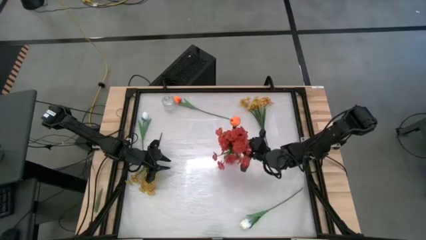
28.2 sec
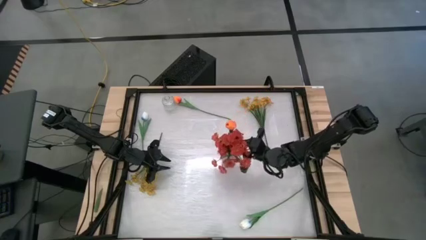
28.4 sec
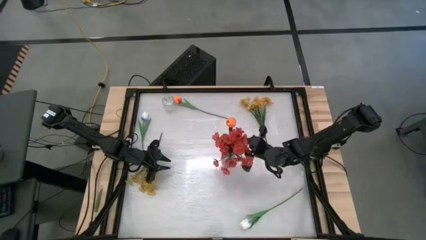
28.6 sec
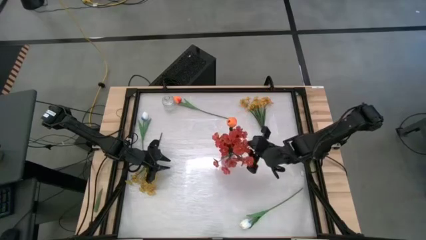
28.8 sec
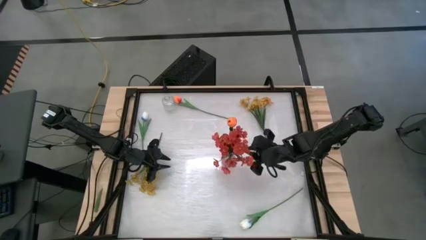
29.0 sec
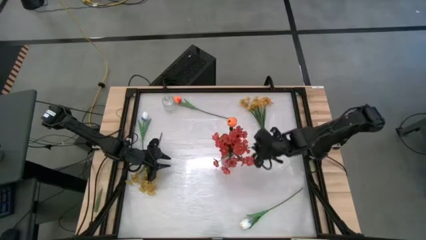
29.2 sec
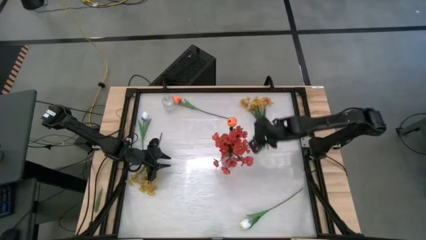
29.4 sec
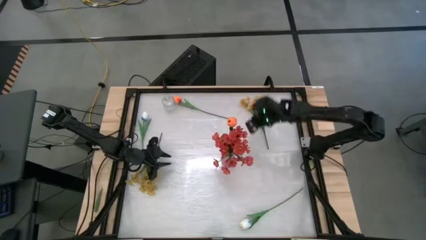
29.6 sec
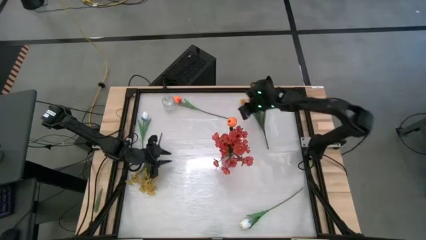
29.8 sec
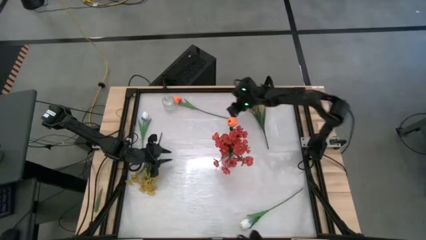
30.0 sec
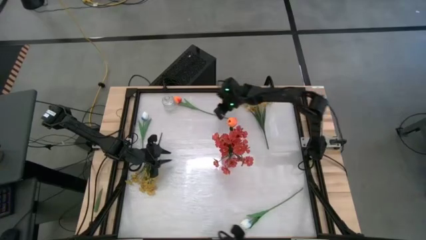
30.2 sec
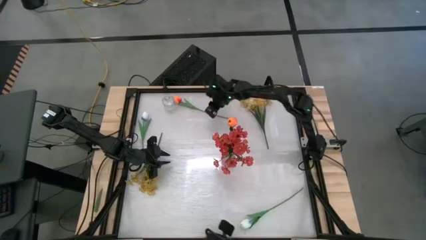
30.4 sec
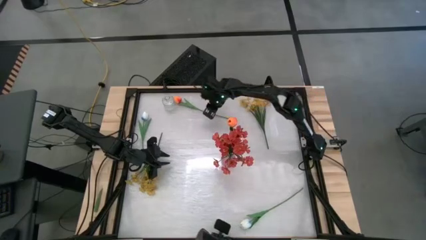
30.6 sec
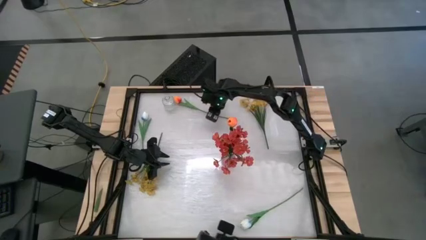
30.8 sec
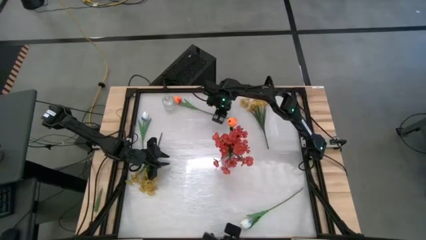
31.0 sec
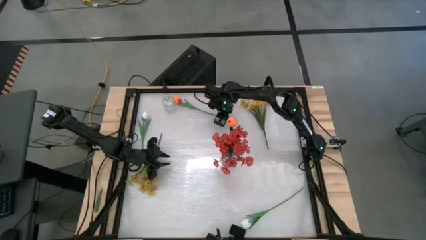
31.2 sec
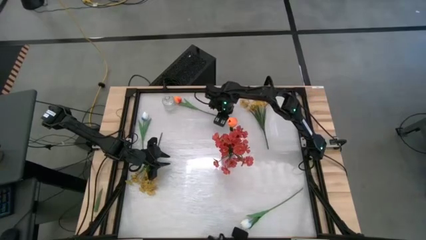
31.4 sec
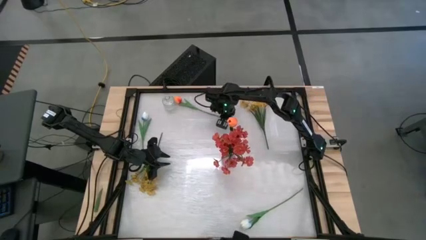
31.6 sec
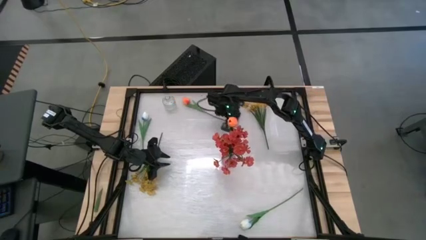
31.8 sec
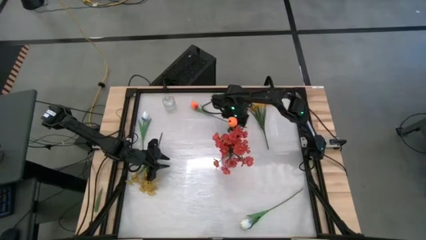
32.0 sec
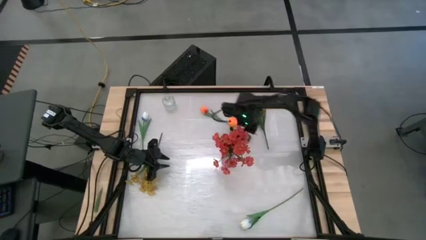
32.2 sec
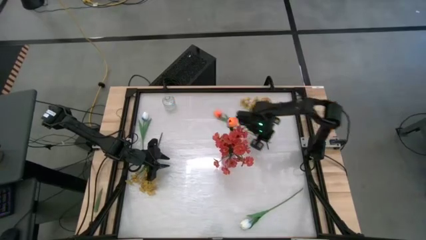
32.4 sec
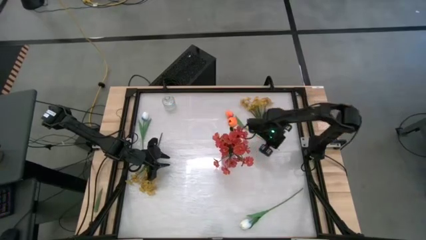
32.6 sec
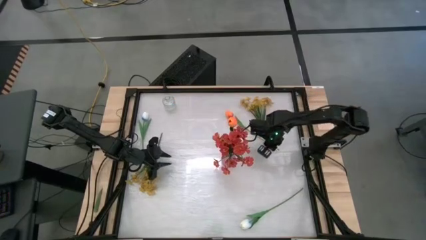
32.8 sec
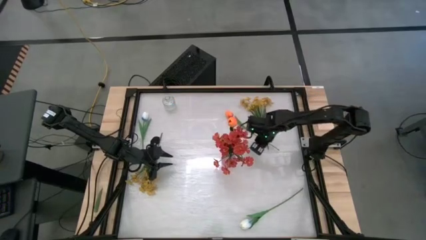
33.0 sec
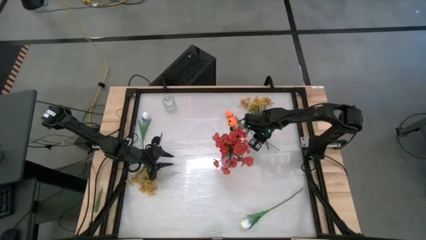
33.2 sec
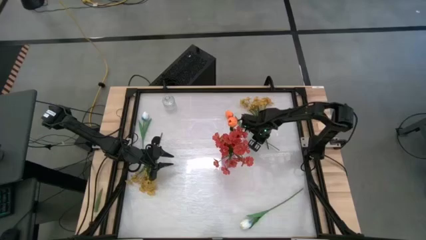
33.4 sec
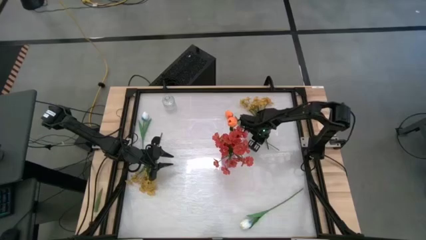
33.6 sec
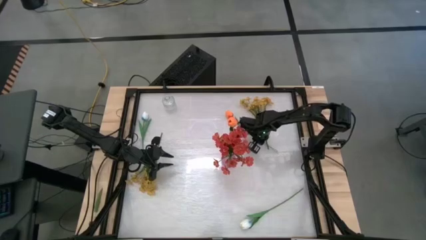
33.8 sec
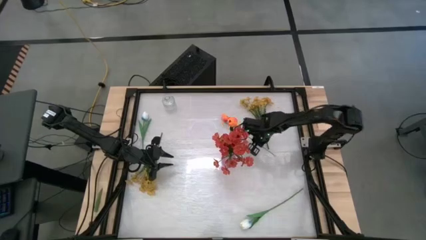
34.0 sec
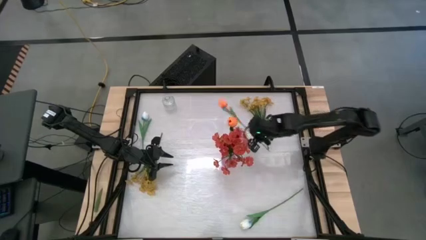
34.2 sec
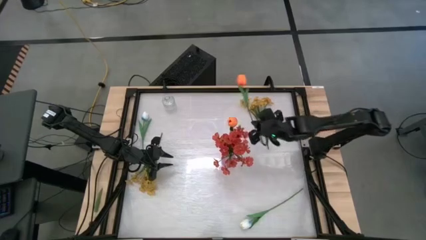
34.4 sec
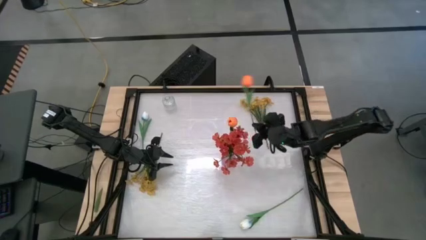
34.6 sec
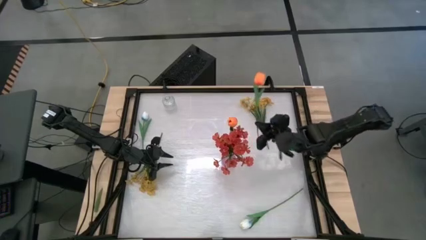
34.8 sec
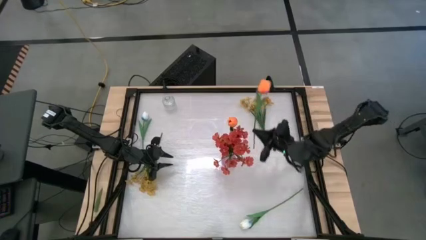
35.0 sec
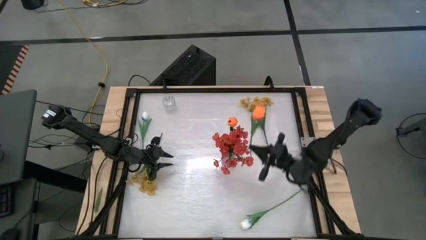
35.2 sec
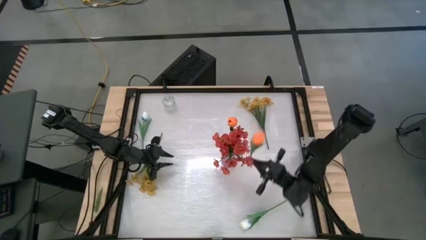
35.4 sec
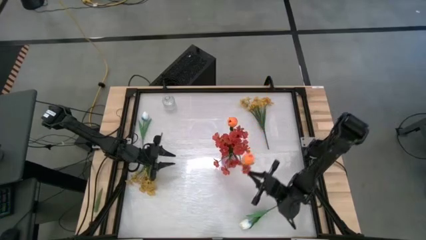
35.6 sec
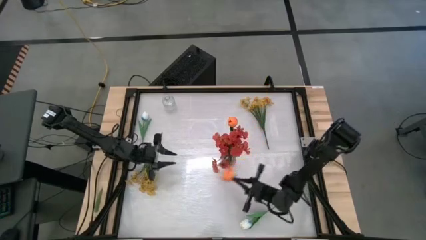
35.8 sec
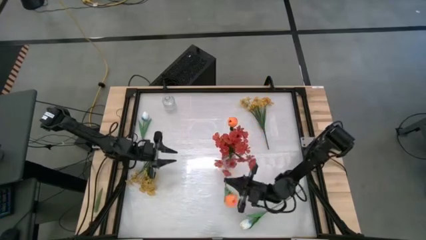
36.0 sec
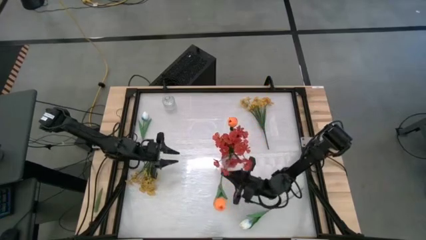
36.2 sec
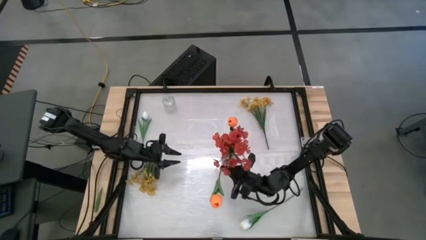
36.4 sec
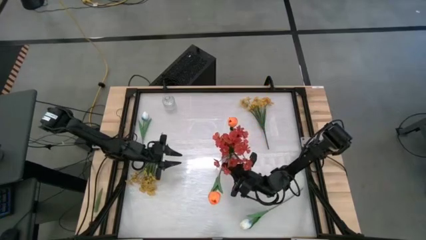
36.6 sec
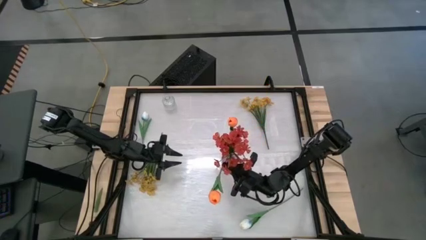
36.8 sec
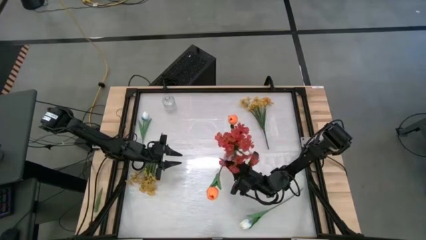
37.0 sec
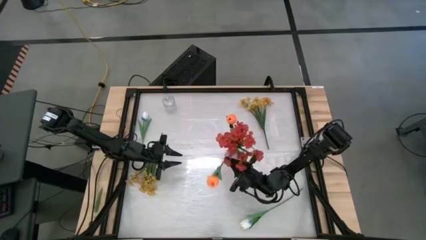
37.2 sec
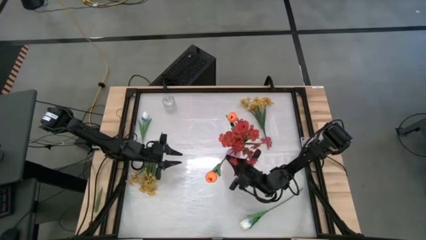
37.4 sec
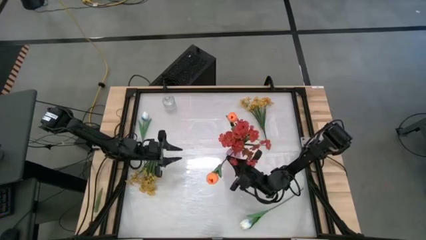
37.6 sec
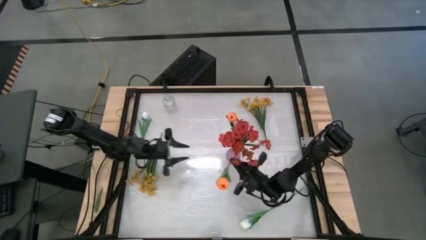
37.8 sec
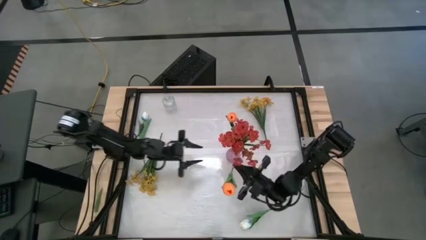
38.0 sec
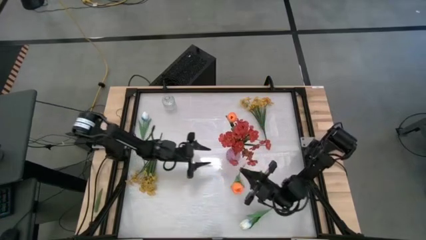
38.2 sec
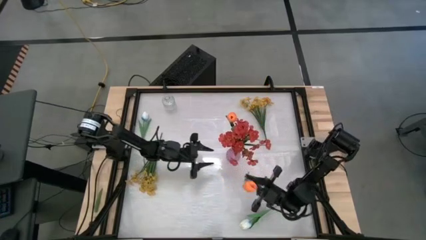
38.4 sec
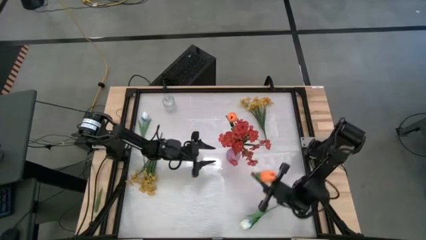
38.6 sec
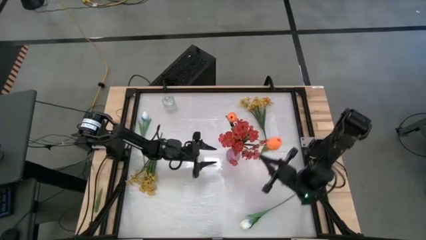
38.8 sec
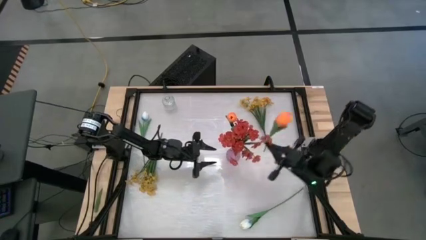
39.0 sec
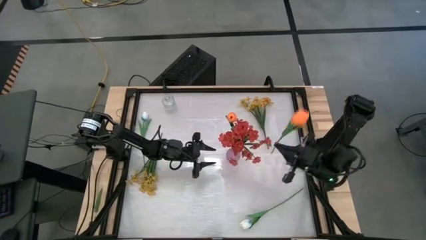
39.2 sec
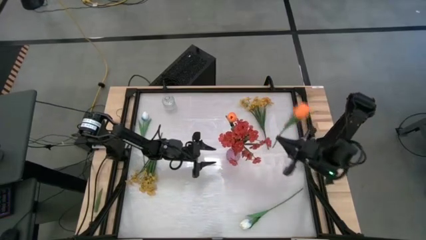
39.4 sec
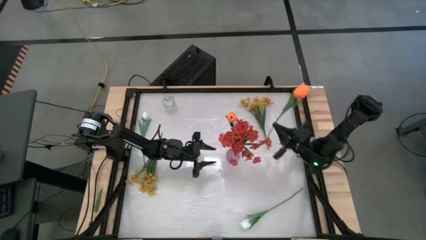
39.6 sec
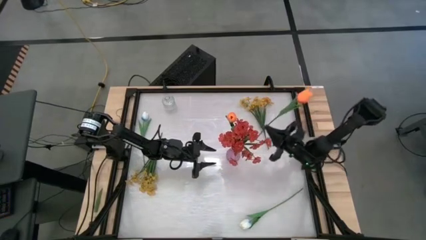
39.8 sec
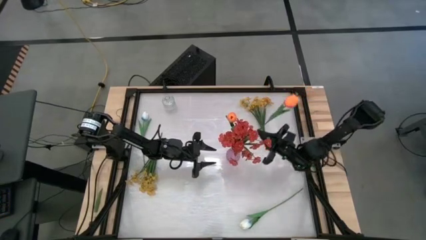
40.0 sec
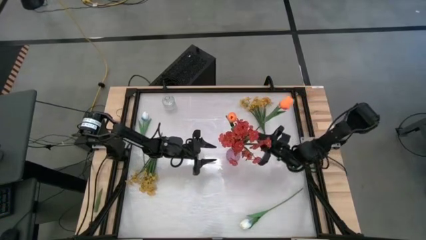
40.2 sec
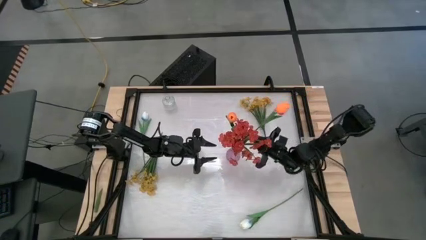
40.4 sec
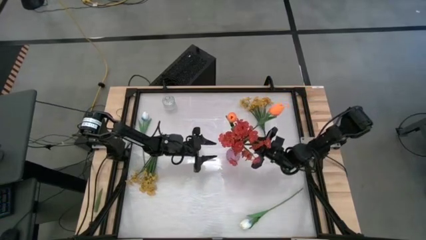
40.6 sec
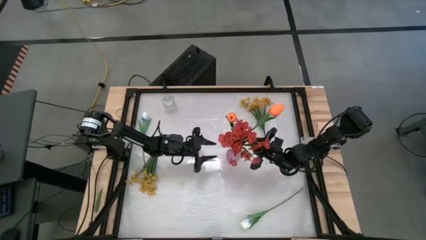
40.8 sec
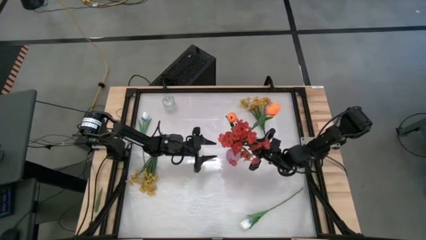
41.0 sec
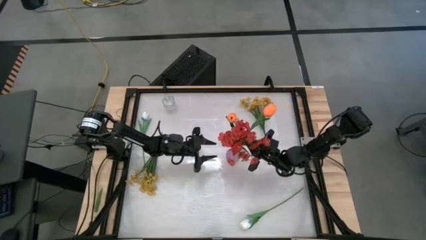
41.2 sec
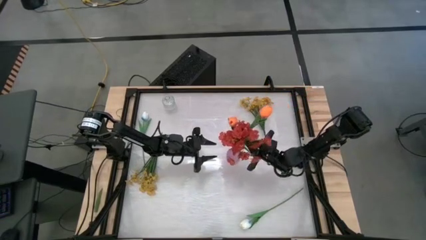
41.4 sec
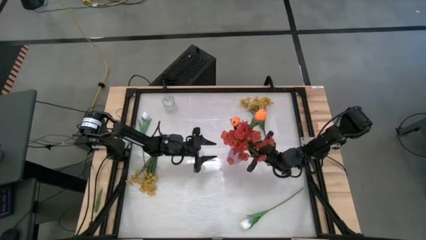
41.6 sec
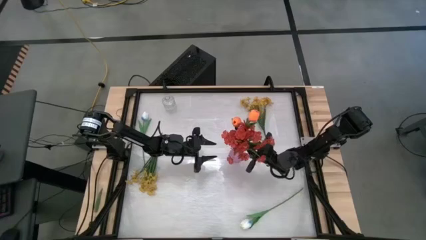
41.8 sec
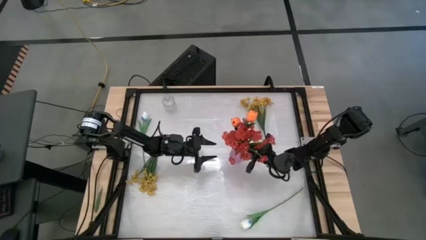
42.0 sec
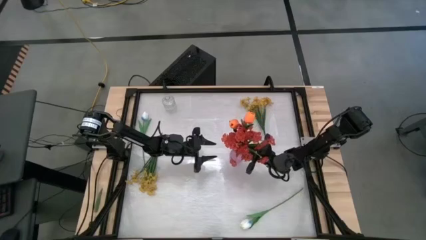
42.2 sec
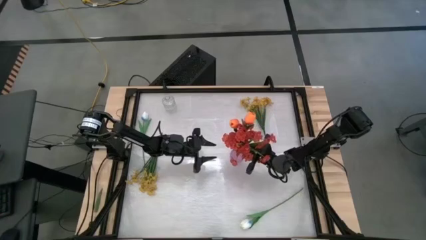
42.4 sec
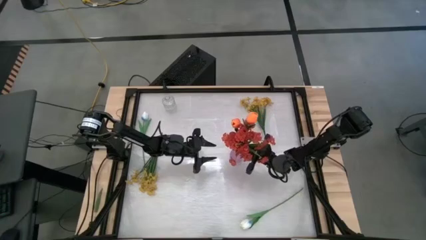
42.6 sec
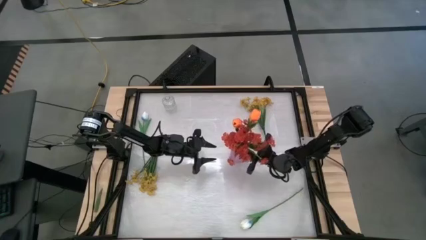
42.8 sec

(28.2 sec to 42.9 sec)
Task: Sort flowers into vase by color
Put the orange tulip into the violet vase
